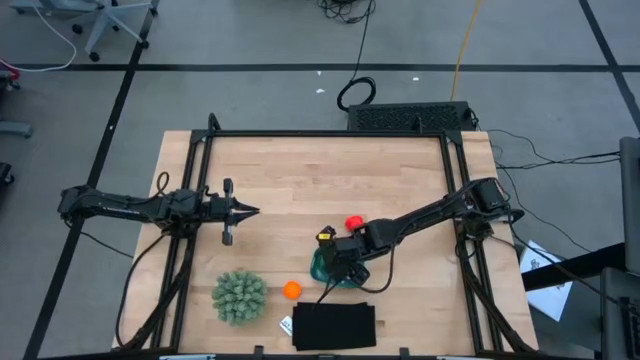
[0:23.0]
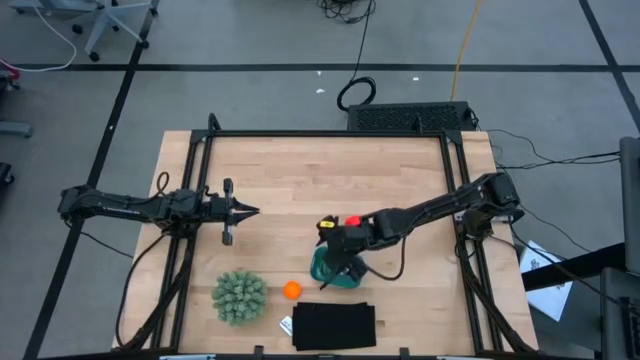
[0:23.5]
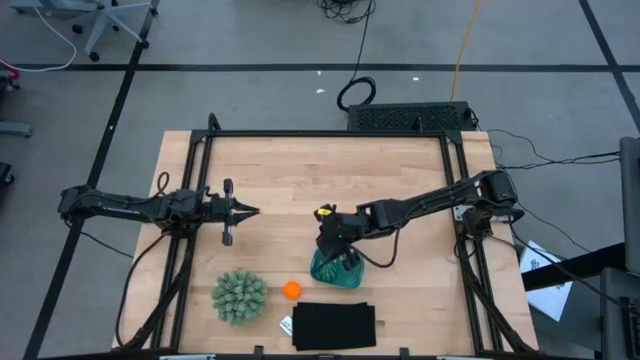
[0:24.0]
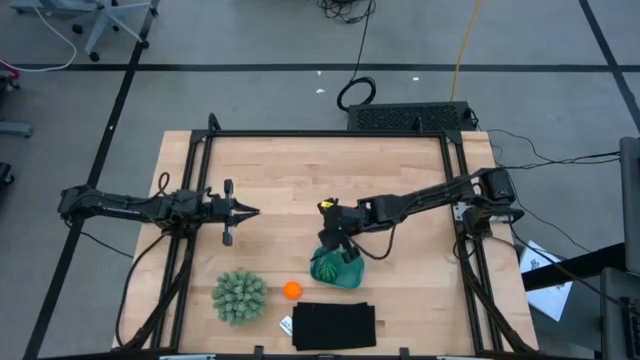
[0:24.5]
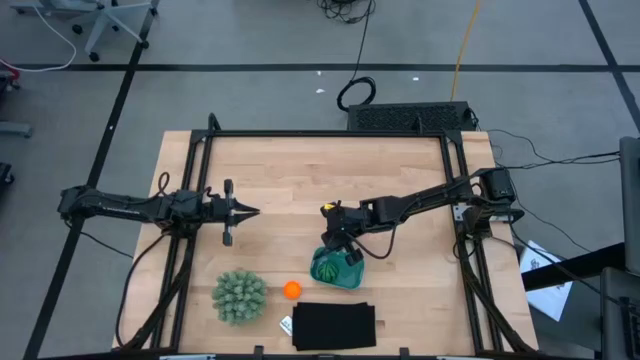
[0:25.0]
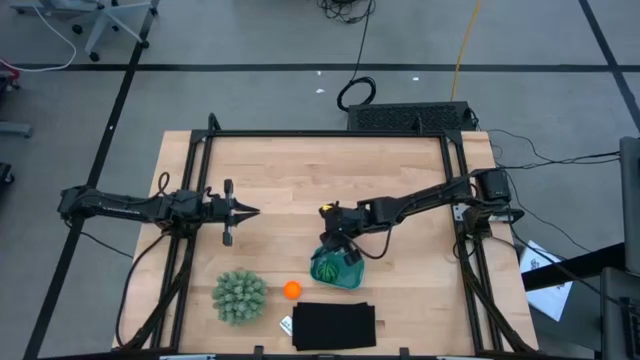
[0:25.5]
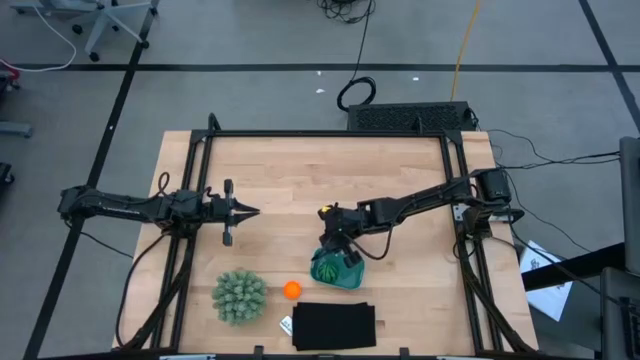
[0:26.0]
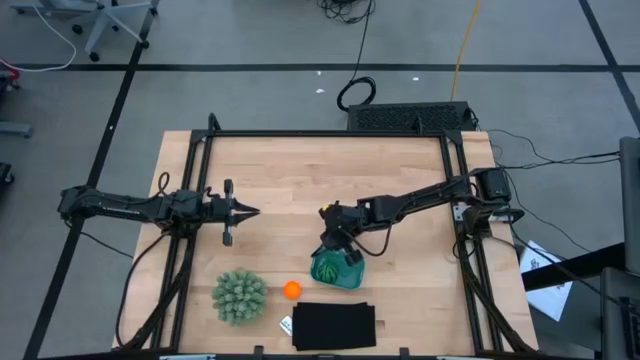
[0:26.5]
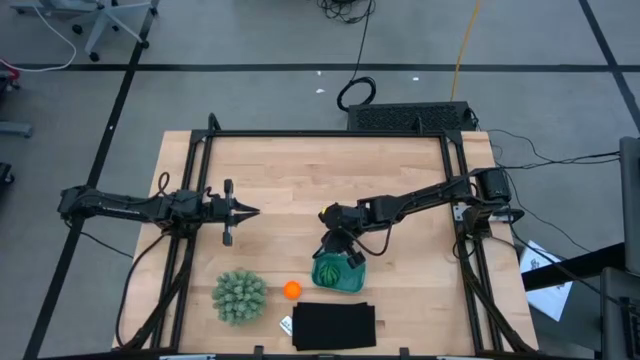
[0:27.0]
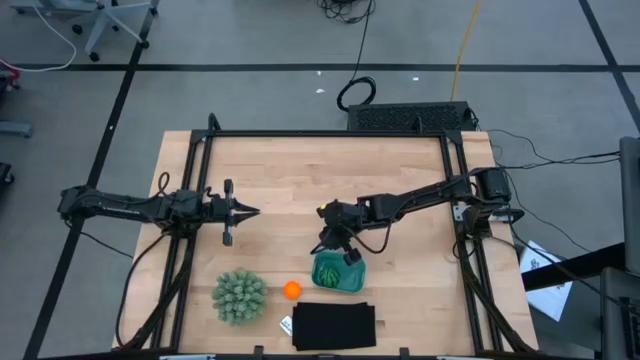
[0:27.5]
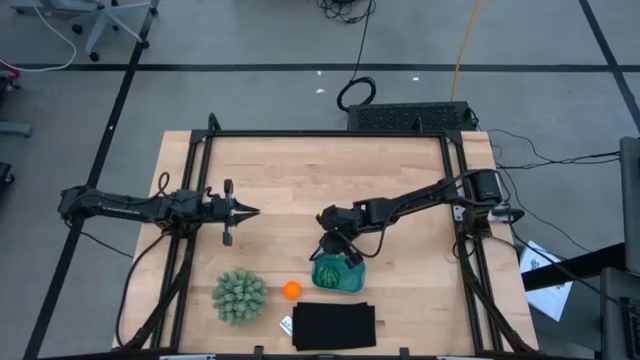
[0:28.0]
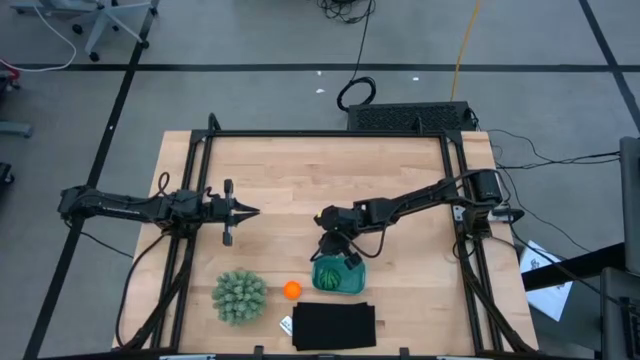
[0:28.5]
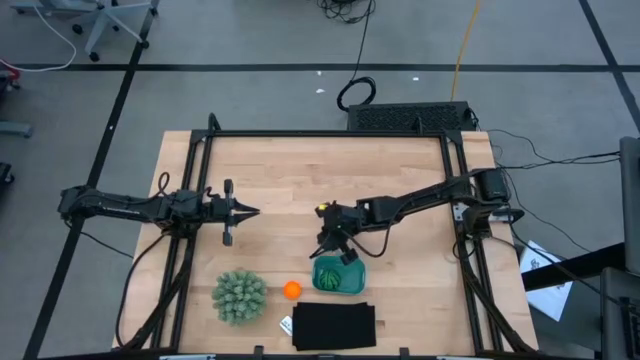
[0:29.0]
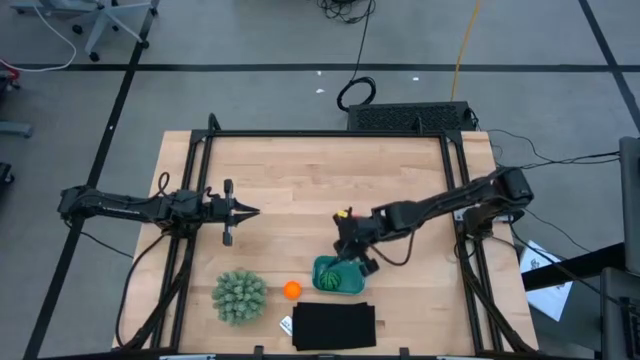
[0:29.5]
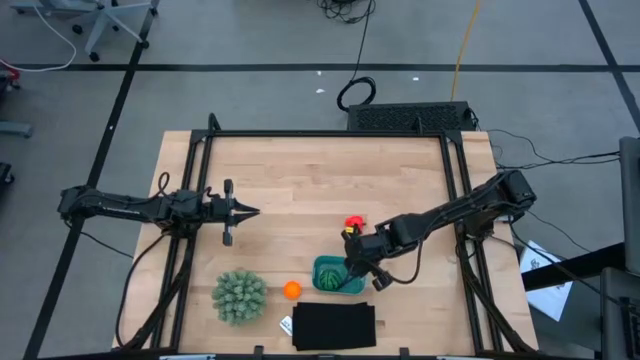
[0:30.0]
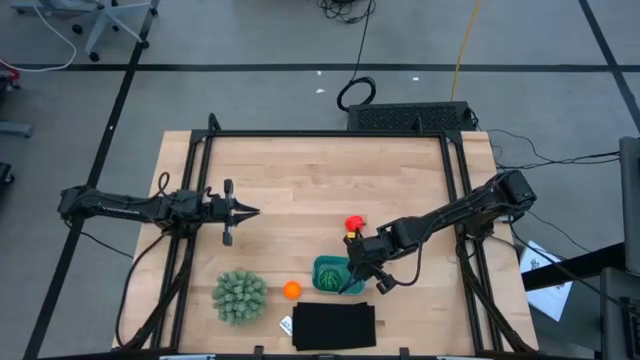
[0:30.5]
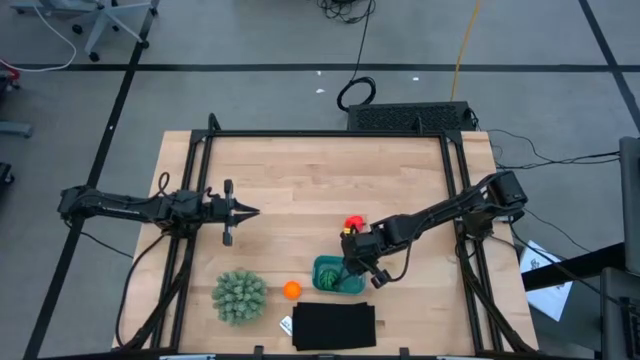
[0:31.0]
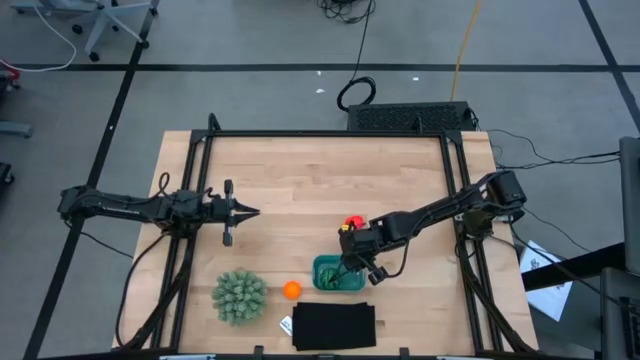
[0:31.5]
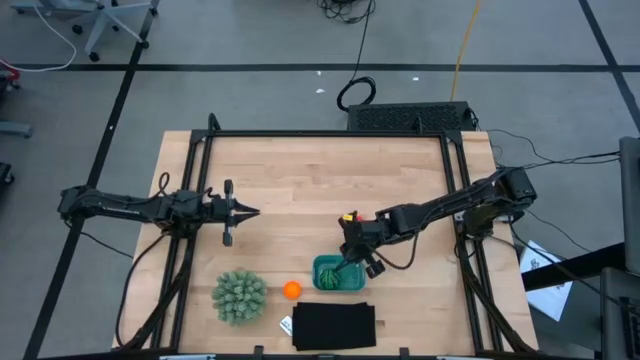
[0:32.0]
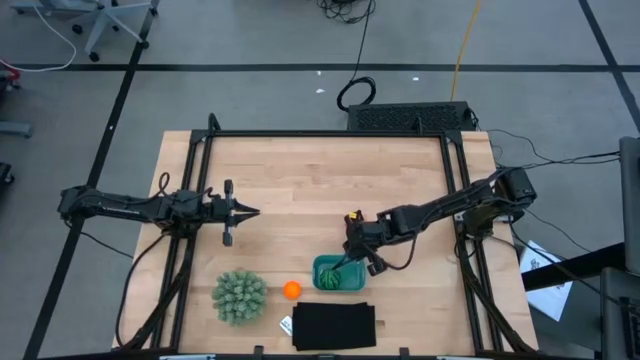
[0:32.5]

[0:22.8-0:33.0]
Task: Pick and placing Produce into tupperware
Adjust the blue bin

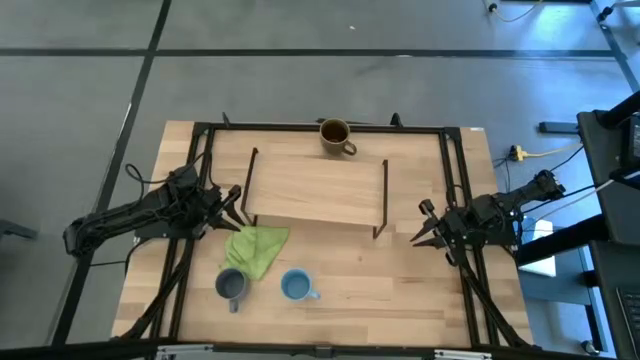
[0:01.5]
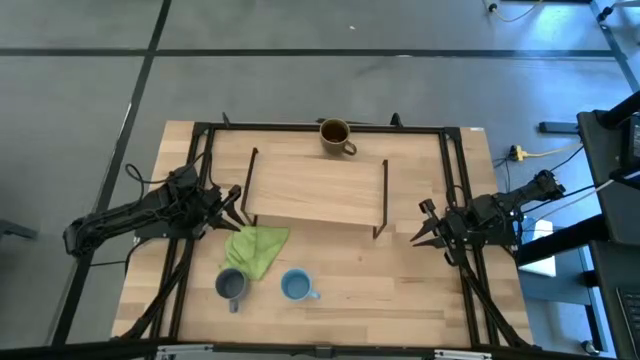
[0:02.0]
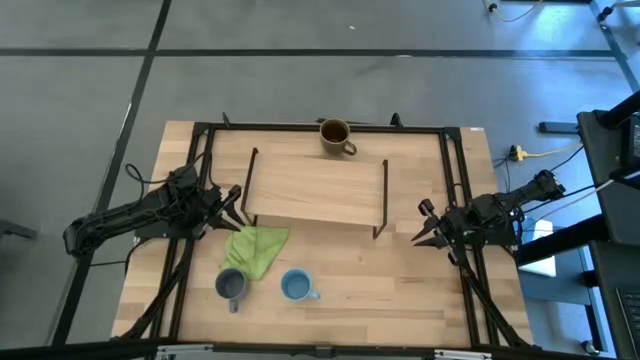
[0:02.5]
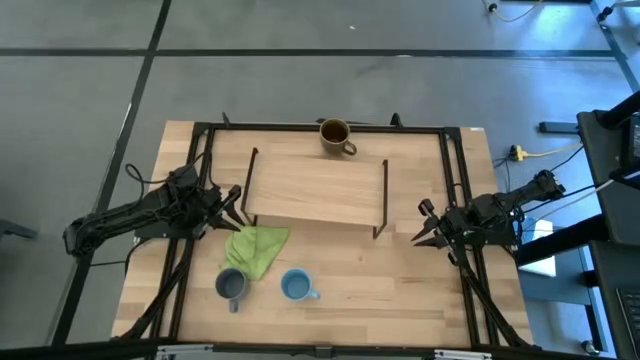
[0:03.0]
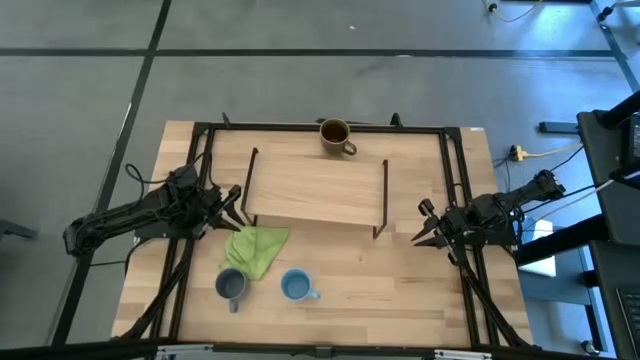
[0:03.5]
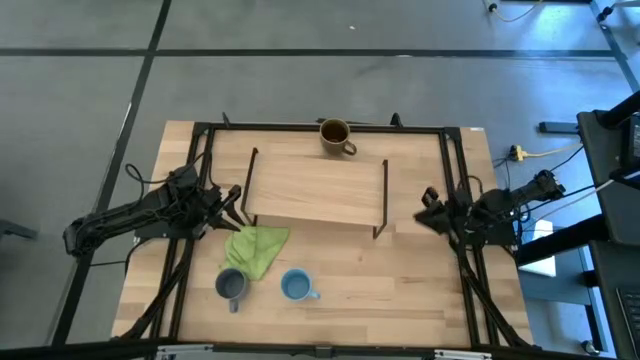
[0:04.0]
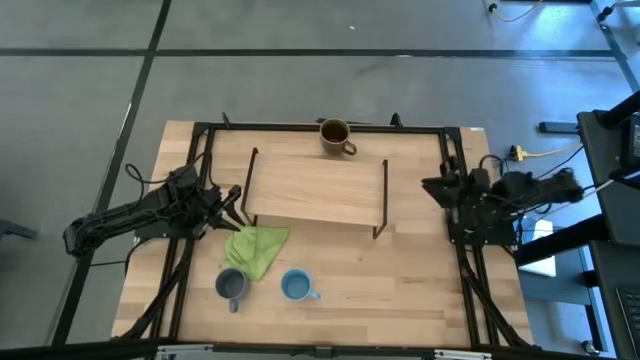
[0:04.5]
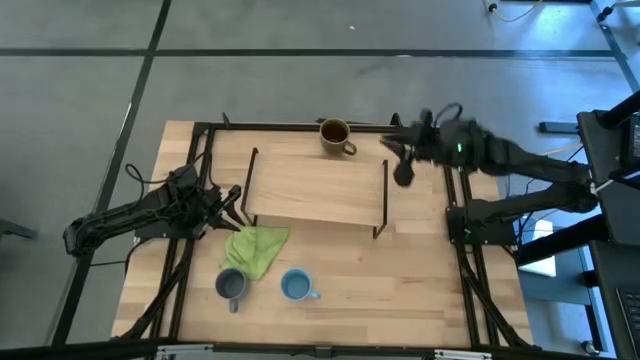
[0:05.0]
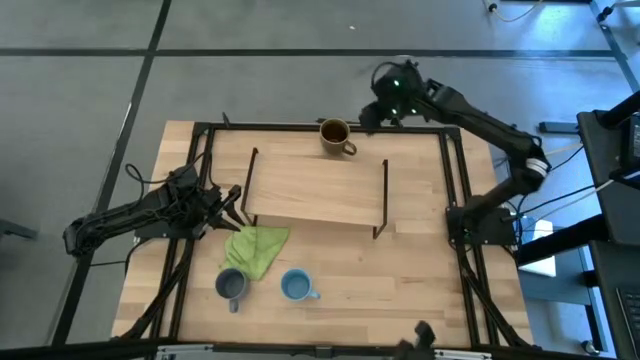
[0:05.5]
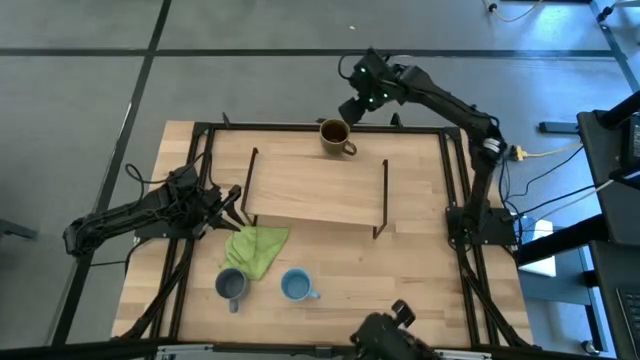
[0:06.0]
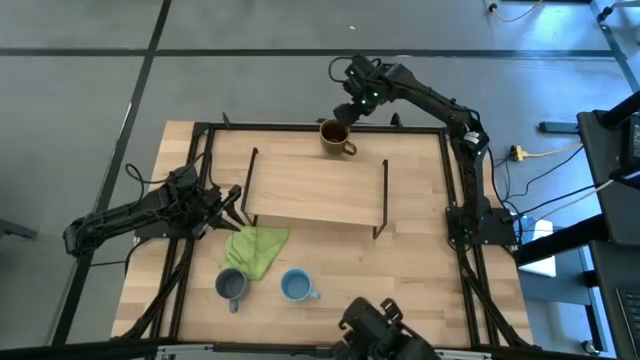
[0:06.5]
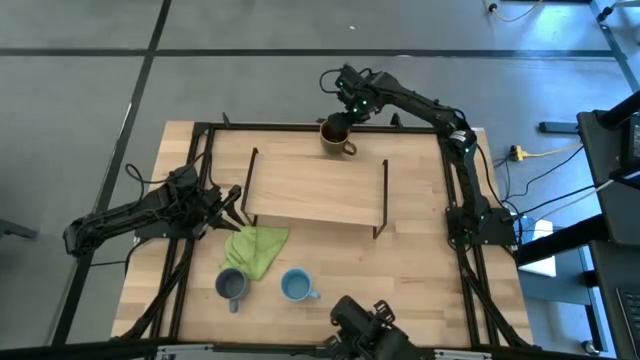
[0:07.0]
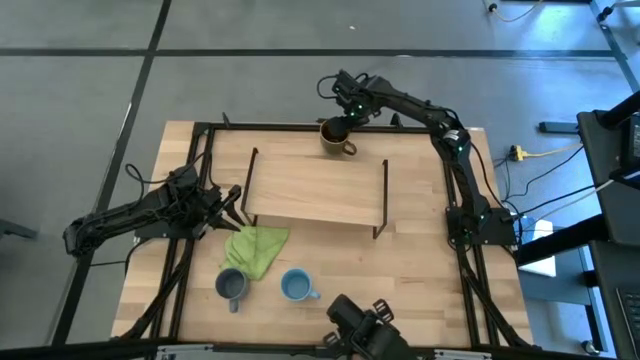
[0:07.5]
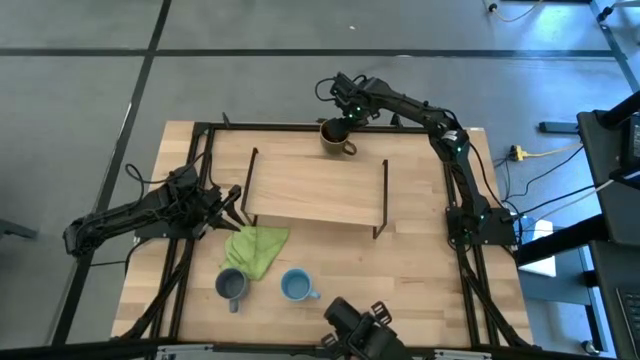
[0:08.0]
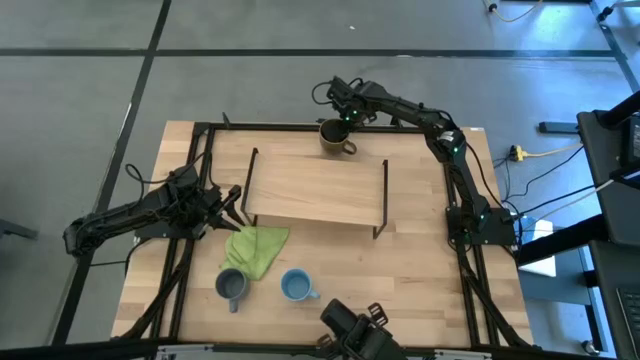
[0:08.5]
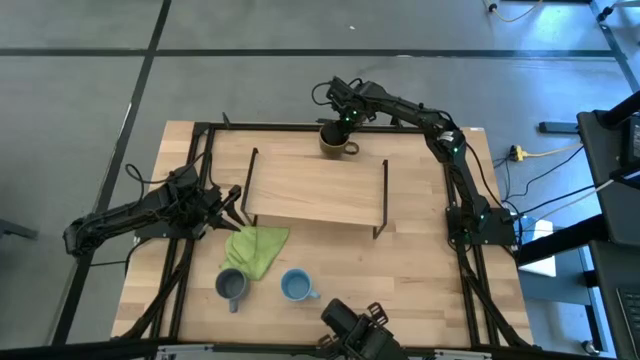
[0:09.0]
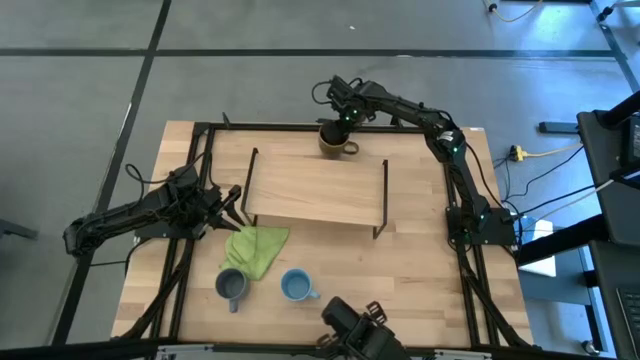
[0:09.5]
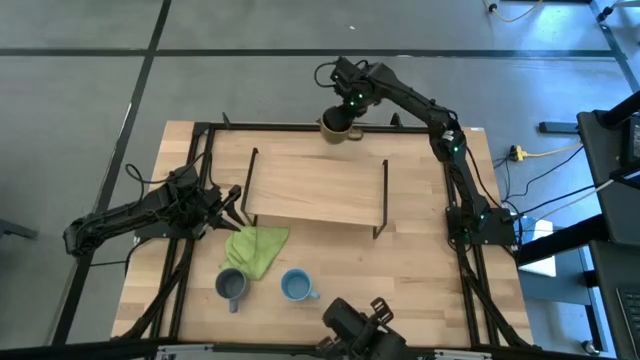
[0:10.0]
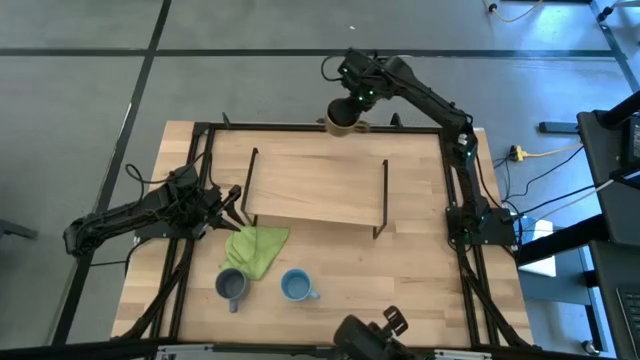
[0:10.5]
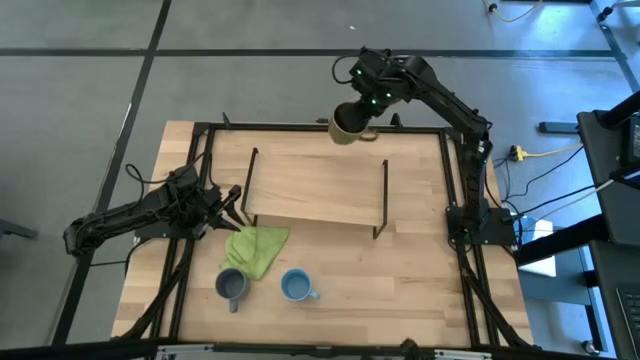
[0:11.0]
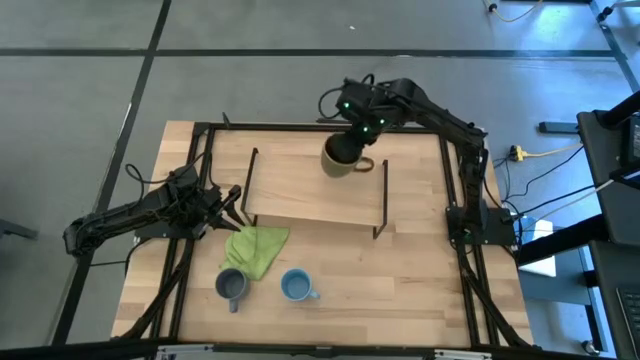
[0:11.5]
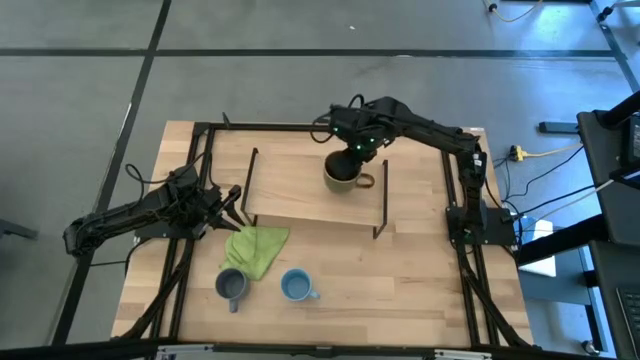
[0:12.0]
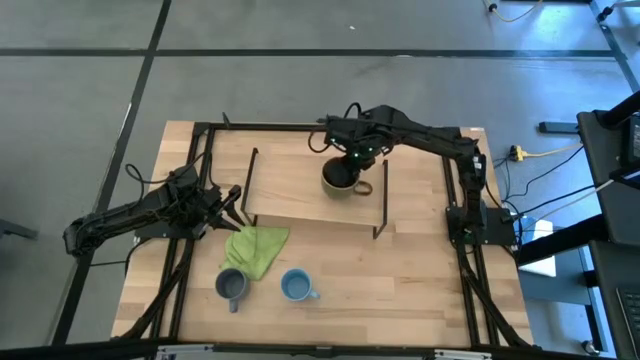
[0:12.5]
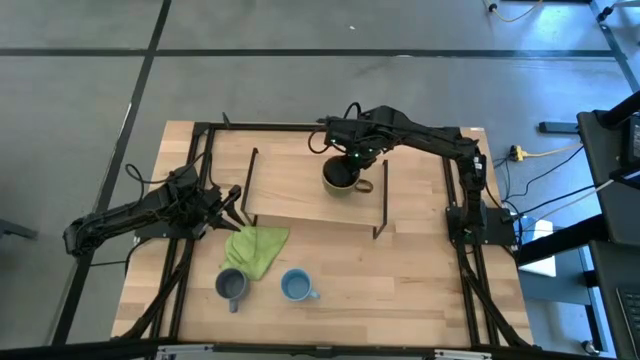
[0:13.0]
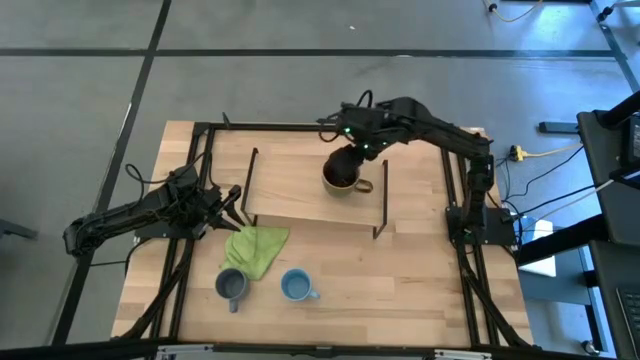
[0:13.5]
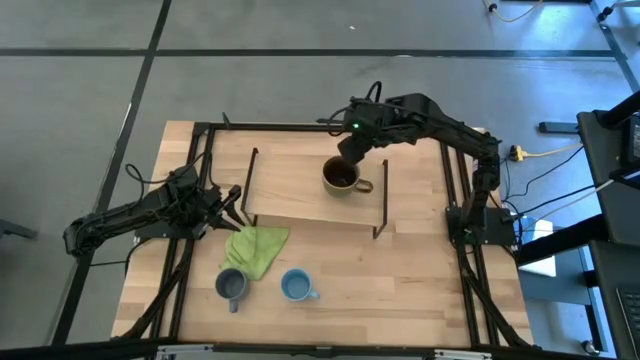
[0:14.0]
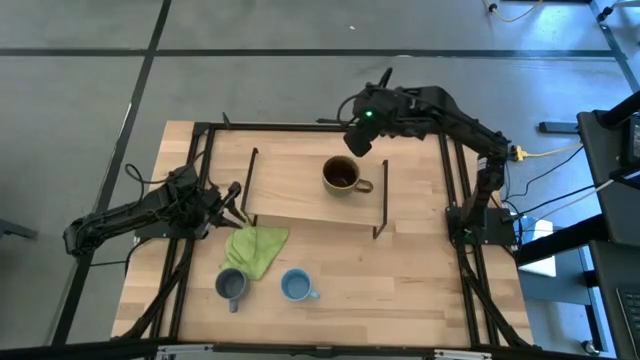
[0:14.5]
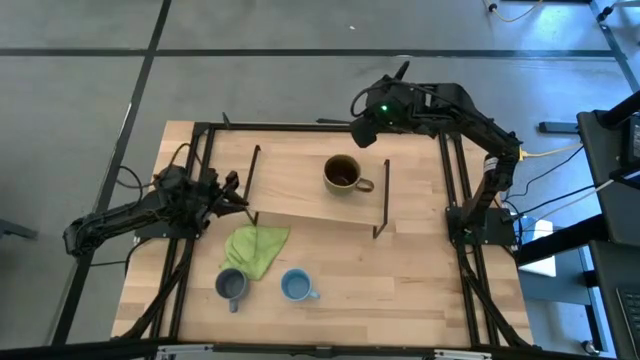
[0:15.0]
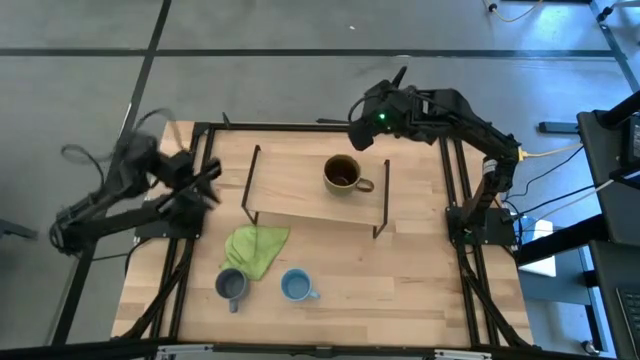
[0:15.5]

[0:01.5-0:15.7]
Task: Stack small to large cups/mugs on shelf
Put the brown mug on the shelf
